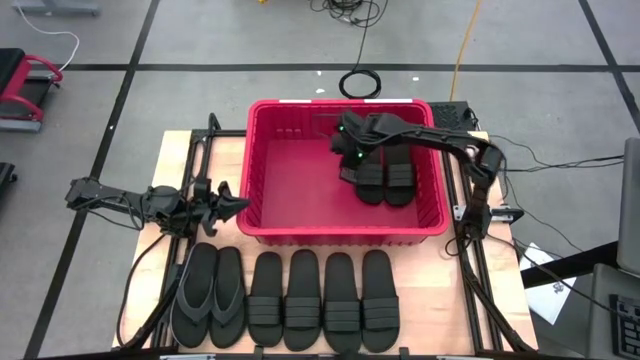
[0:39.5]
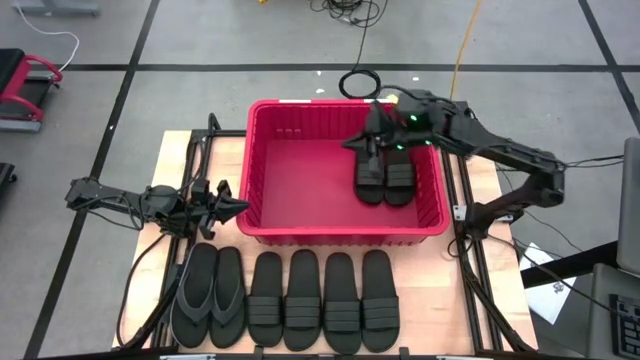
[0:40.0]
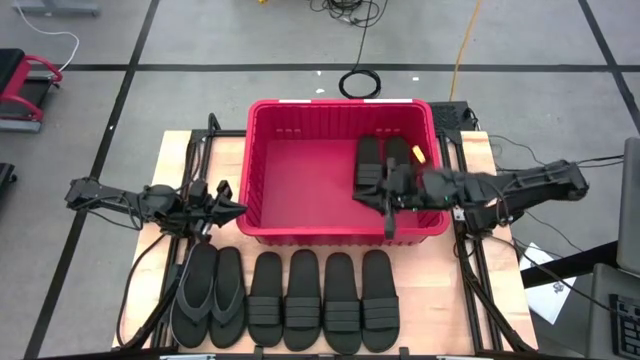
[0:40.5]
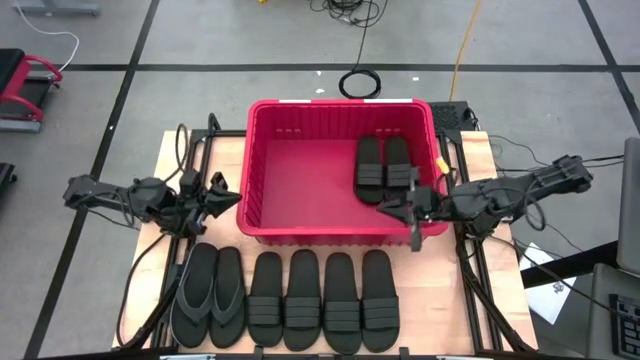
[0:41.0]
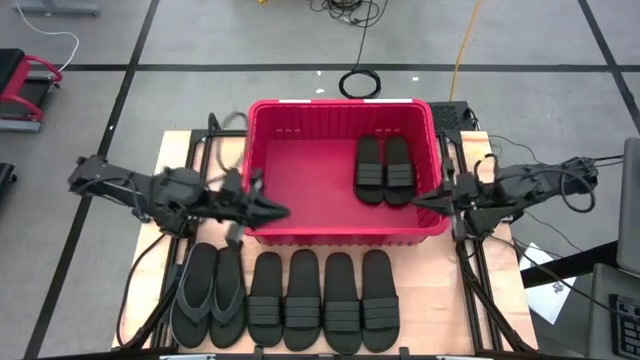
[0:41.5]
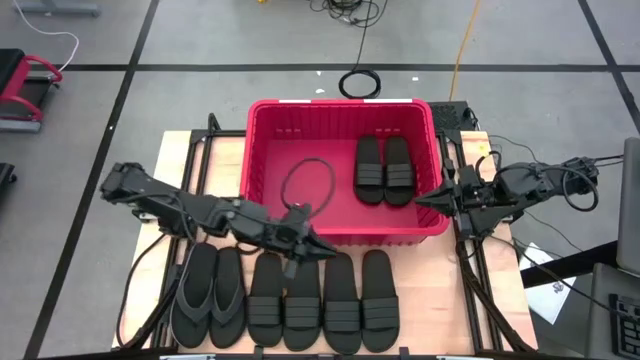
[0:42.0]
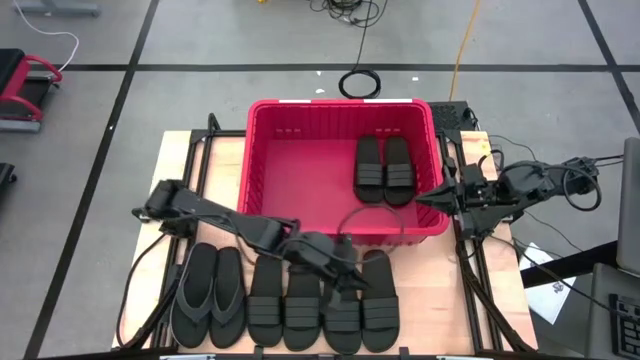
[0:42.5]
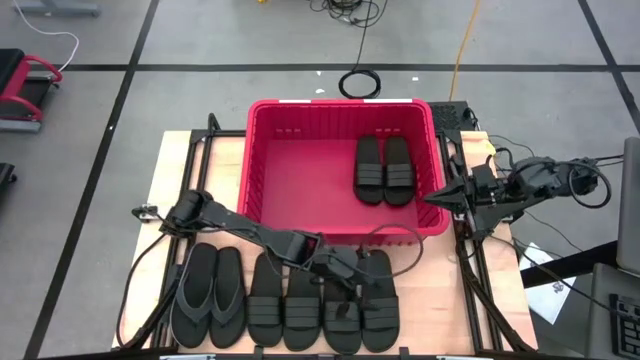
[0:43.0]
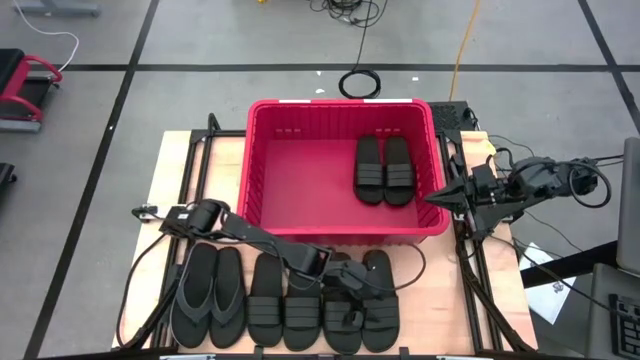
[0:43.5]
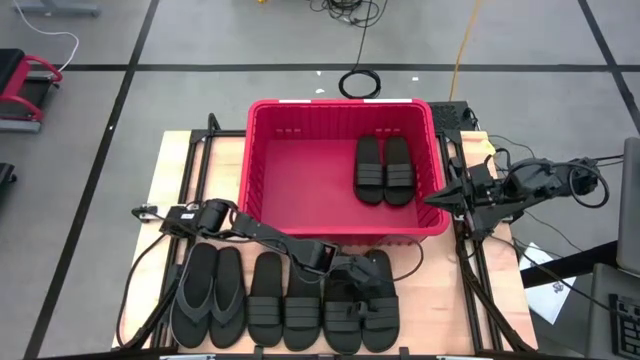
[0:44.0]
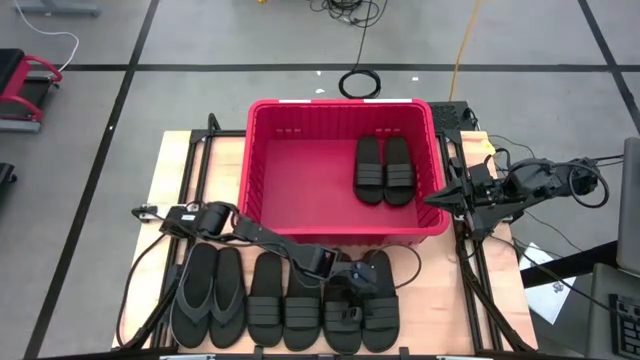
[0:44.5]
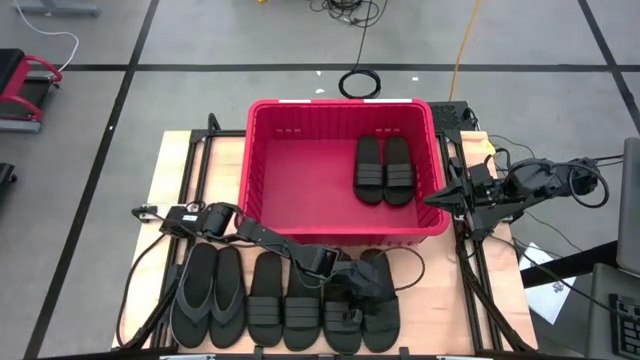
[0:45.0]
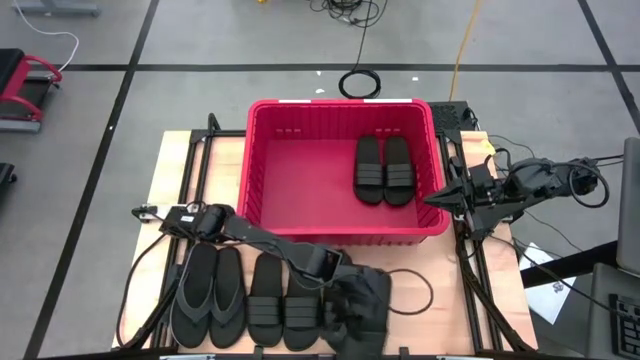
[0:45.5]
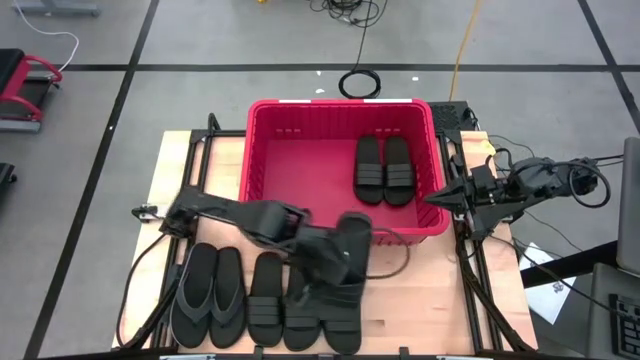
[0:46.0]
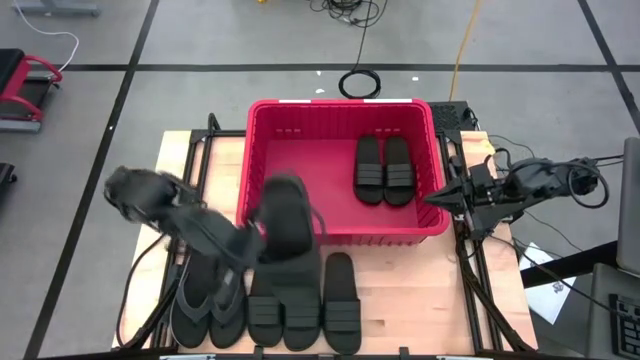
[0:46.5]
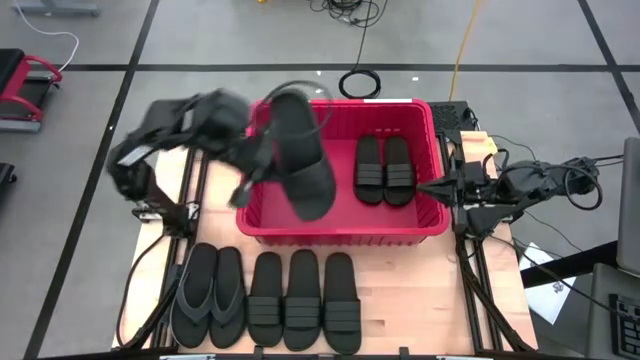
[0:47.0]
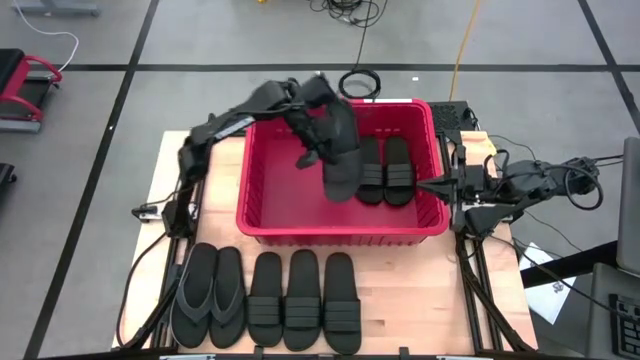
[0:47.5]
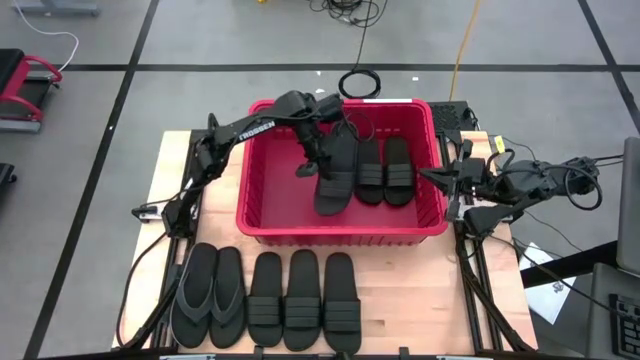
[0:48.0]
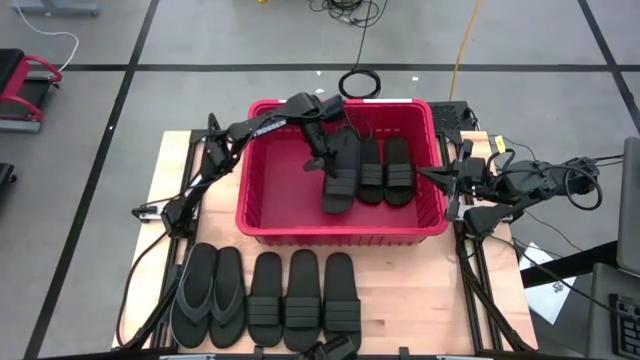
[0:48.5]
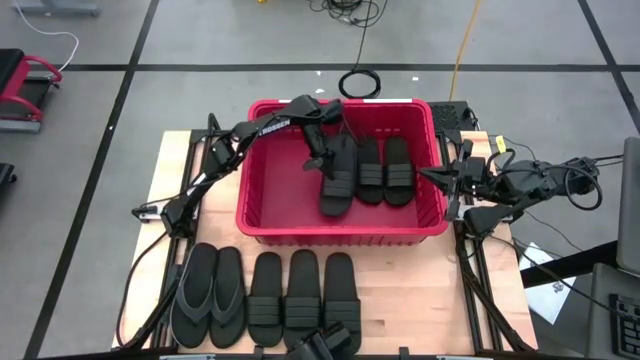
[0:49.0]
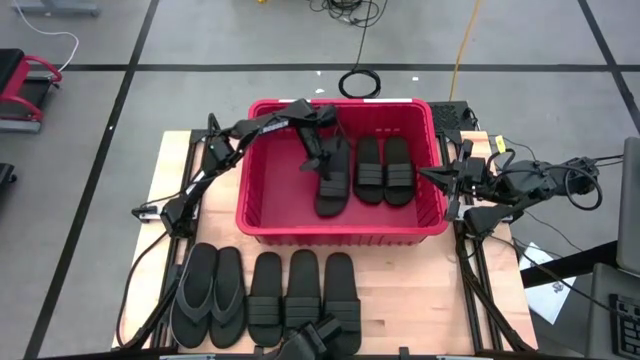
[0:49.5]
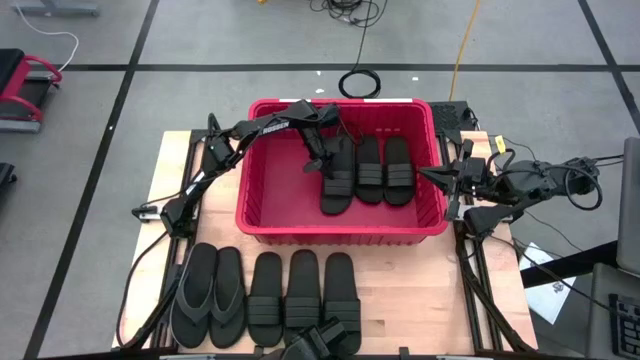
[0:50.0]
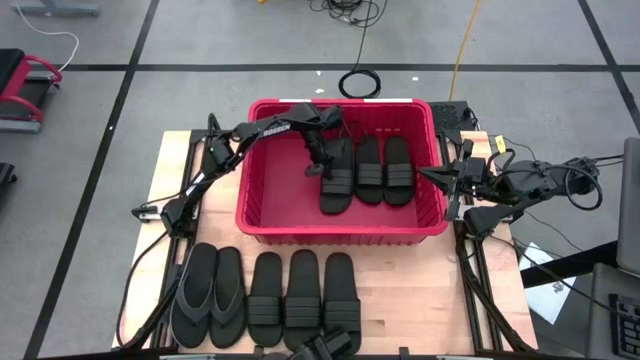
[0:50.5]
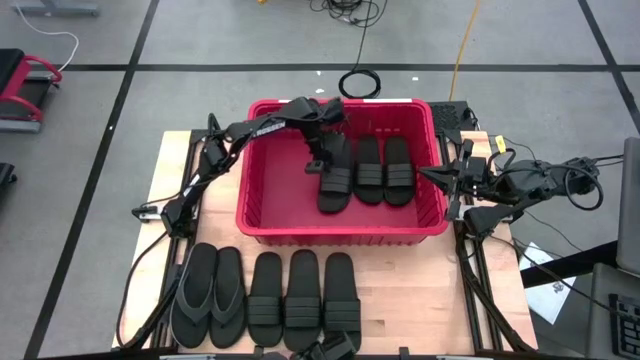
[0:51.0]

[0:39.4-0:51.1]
Task: Pick and place slides into bin
Put the black slide into the red bin

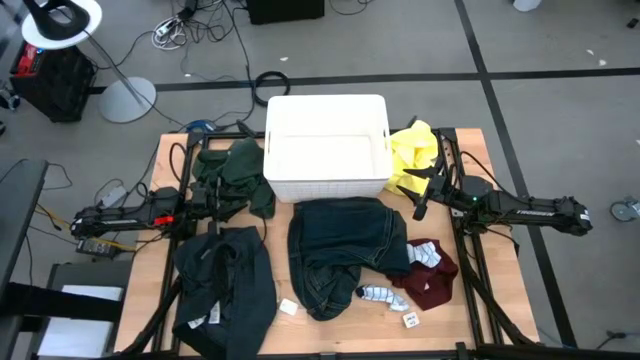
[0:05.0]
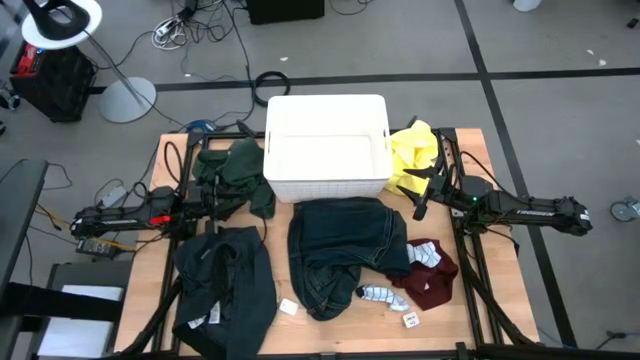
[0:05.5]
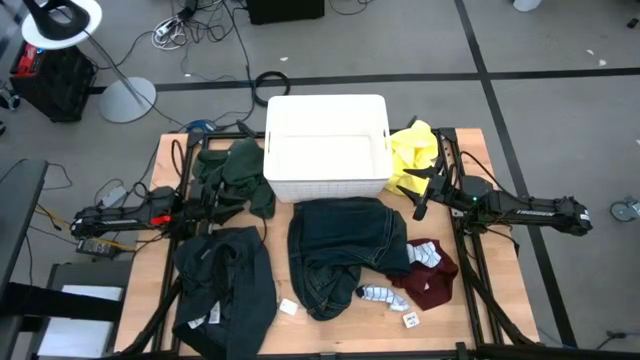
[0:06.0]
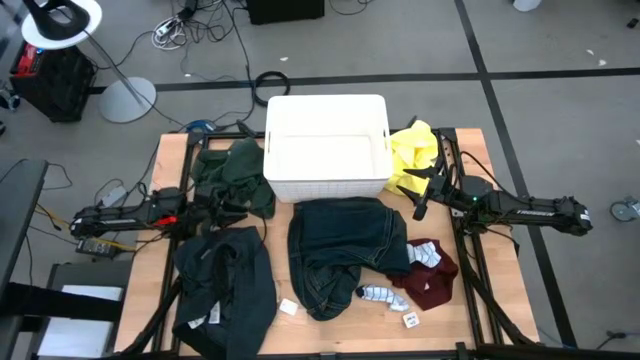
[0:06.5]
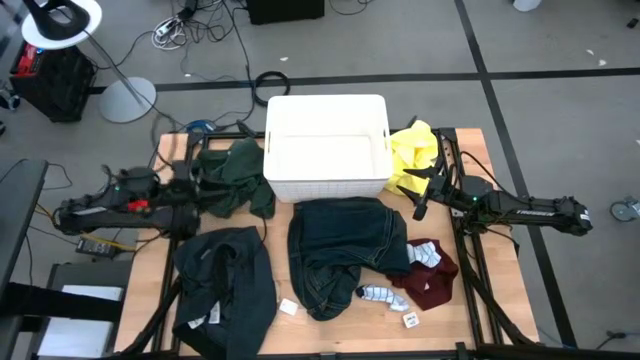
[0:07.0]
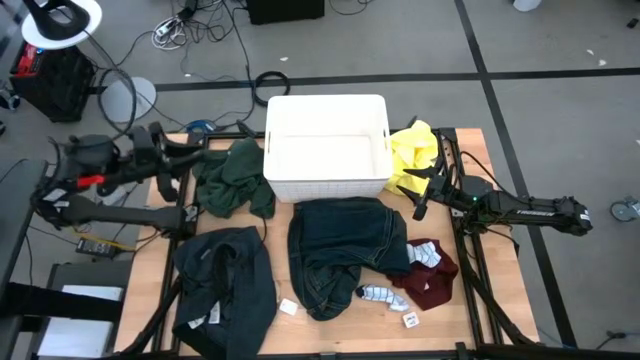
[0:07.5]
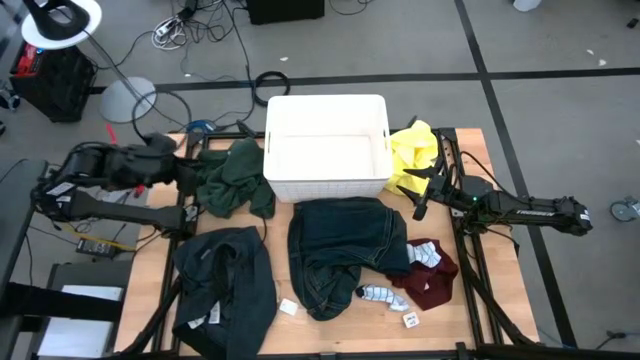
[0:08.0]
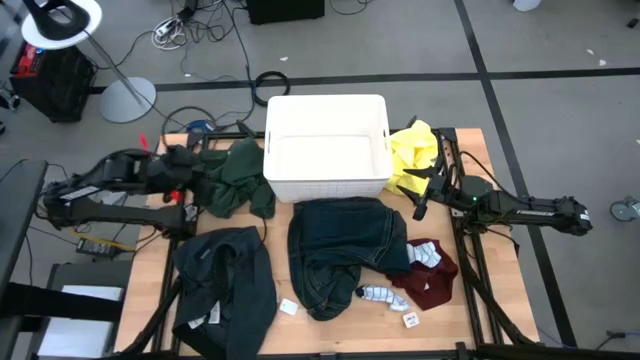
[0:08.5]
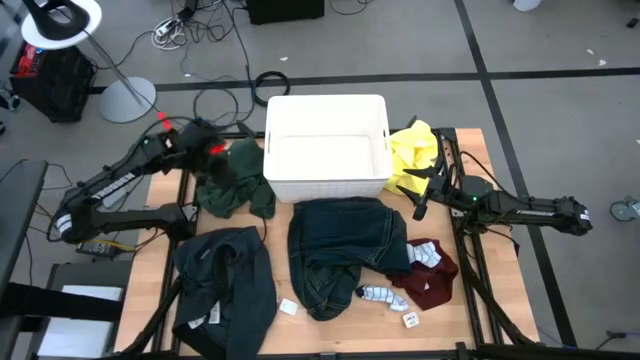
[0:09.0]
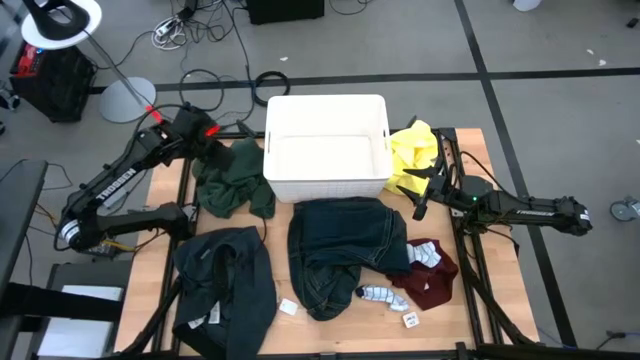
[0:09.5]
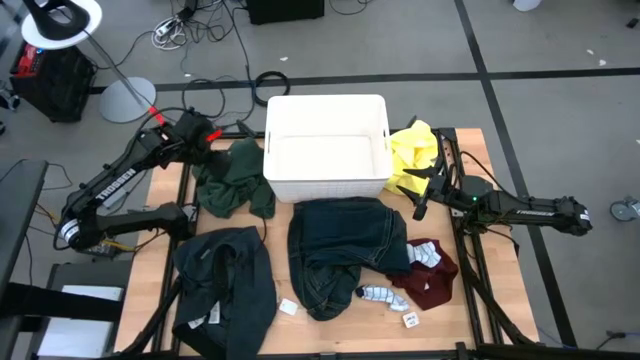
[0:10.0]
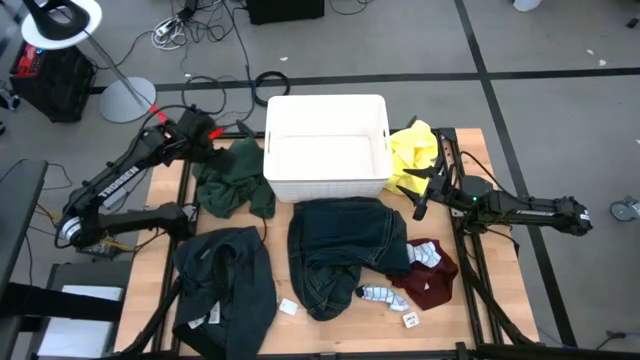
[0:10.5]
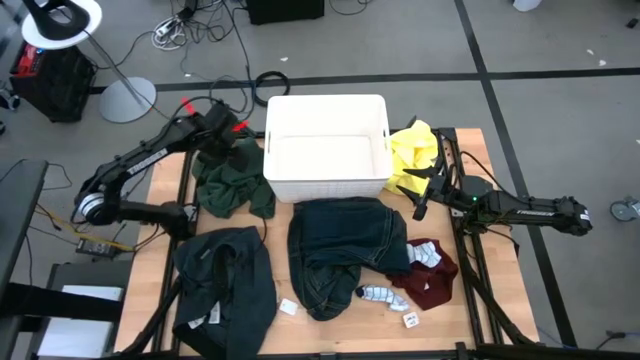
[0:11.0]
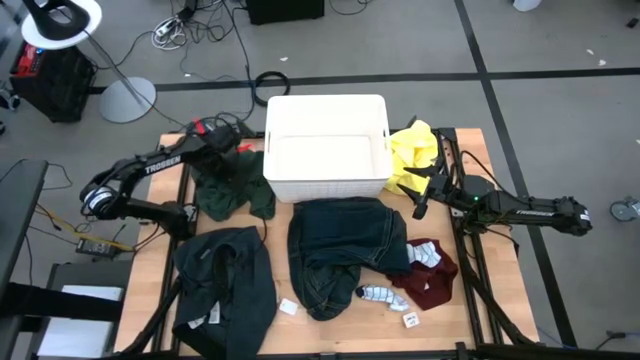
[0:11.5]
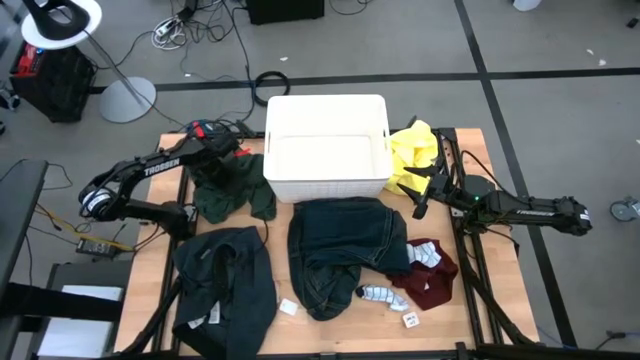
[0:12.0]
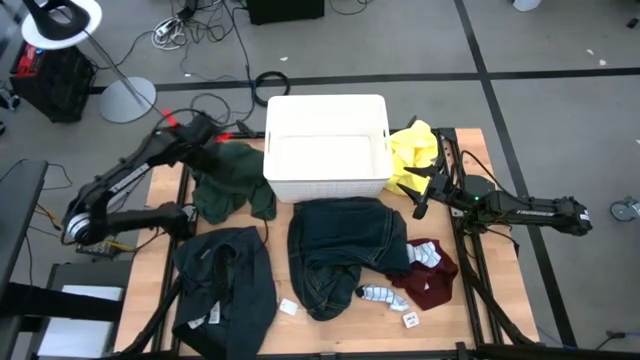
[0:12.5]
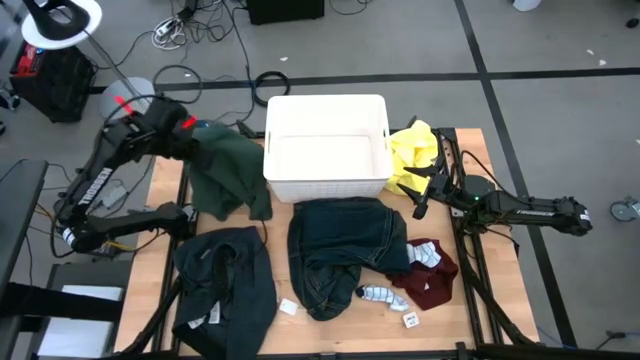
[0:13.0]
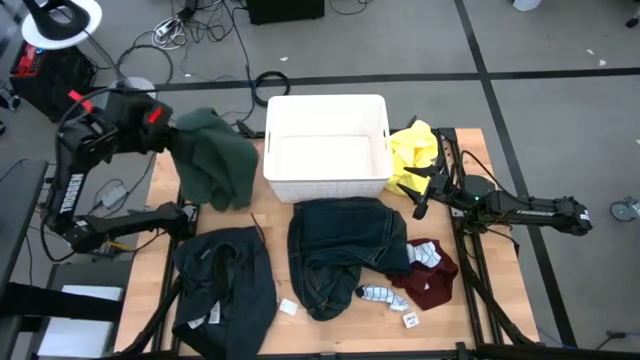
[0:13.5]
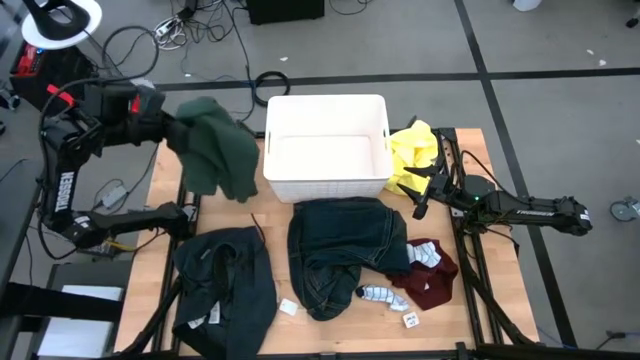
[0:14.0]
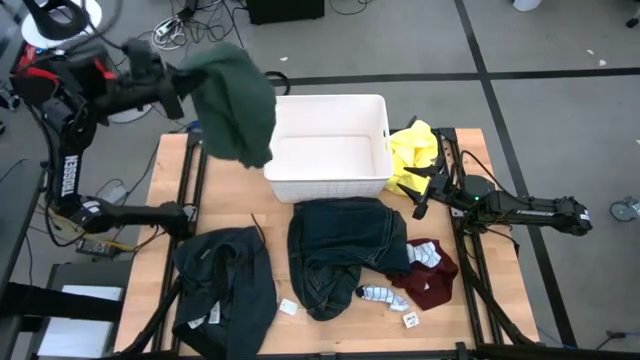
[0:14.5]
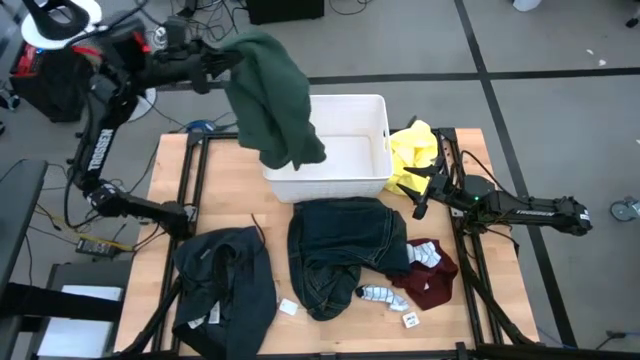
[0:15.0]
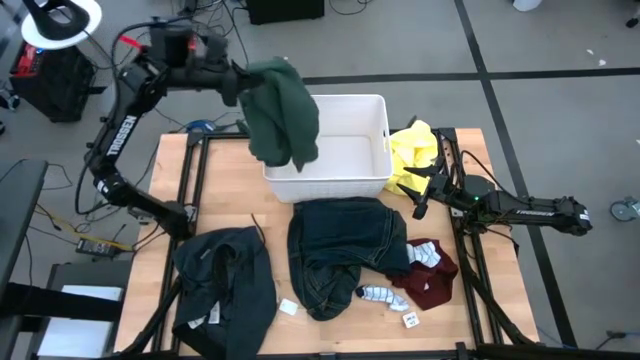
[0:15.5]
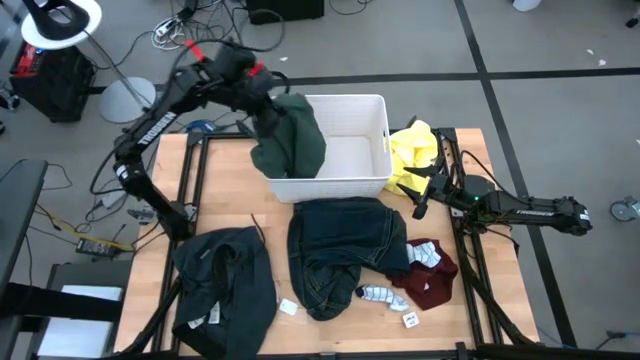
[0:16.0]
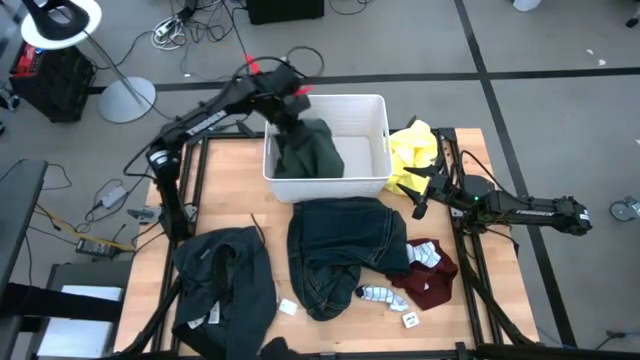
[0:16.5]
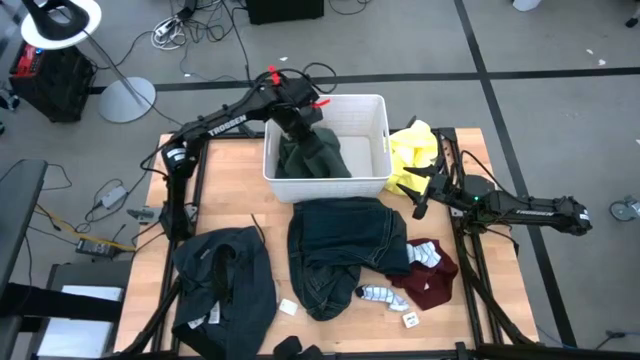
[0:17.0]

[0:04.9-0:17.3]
Task: Sort clothes
Put the dark green shirt into the white laundry bin
